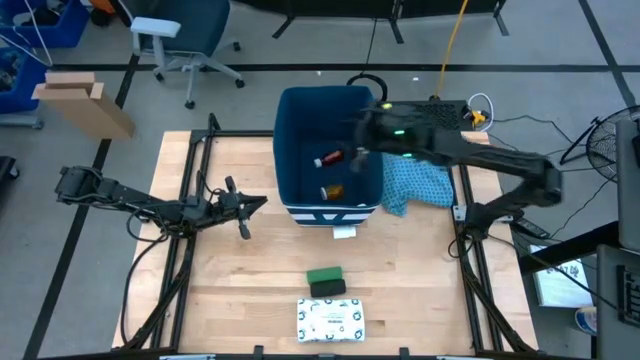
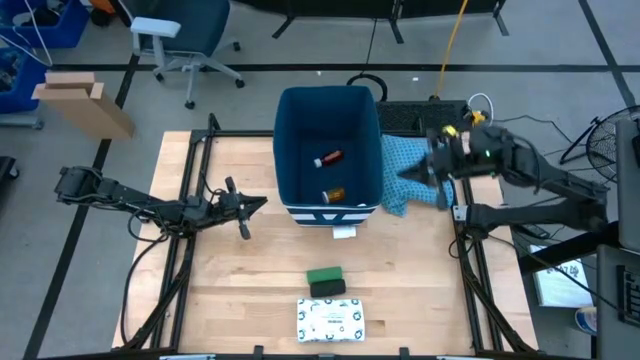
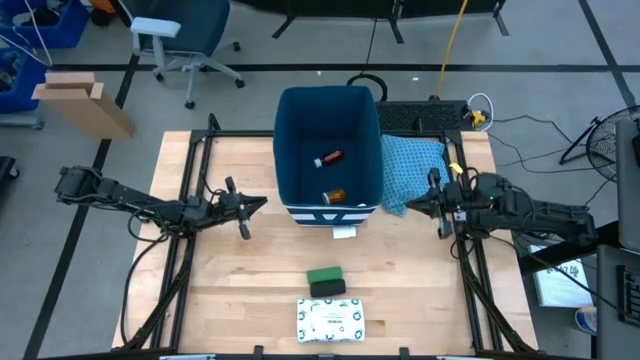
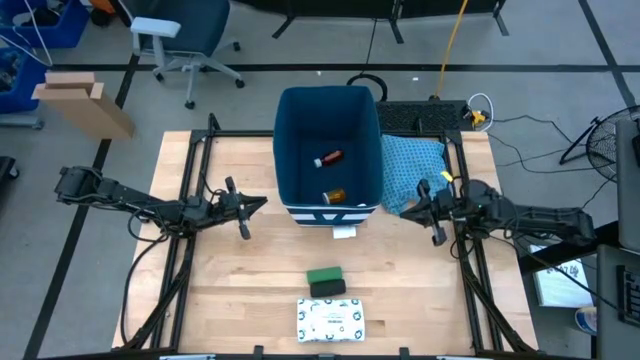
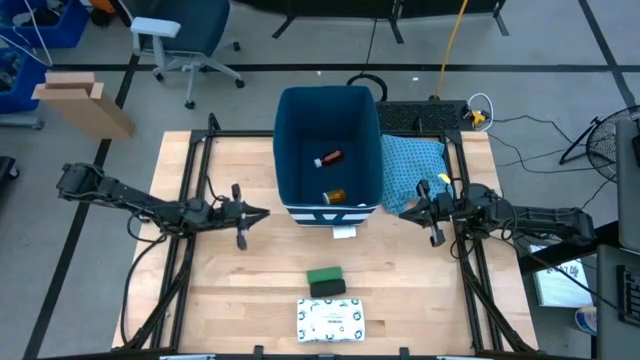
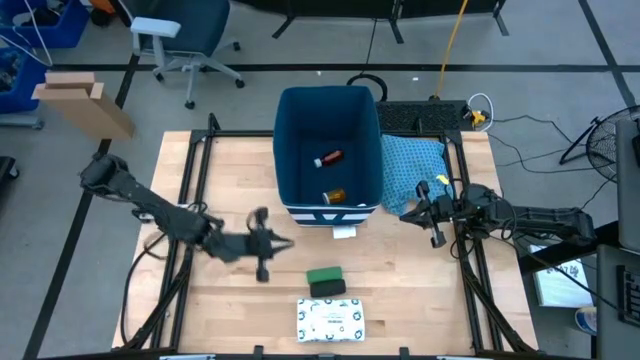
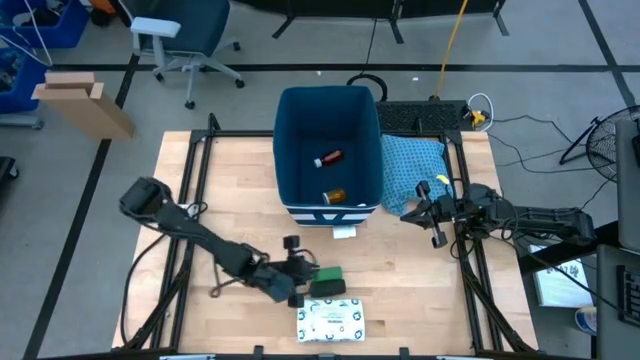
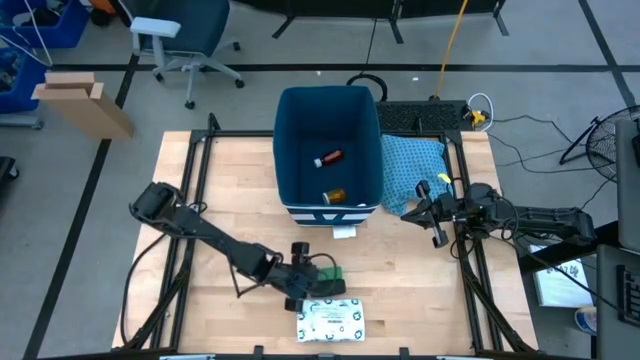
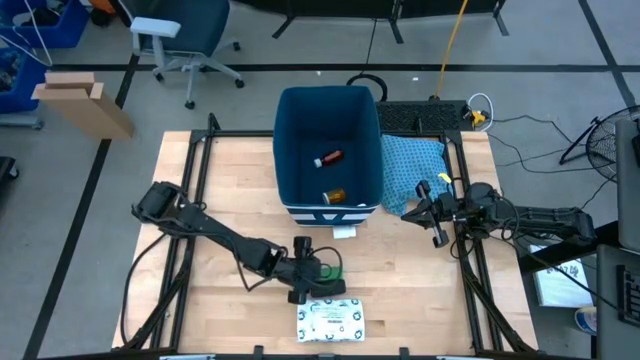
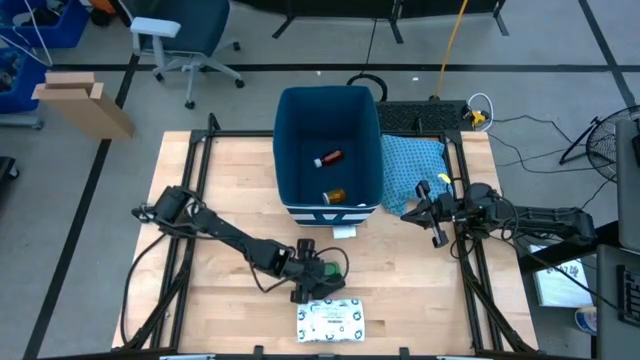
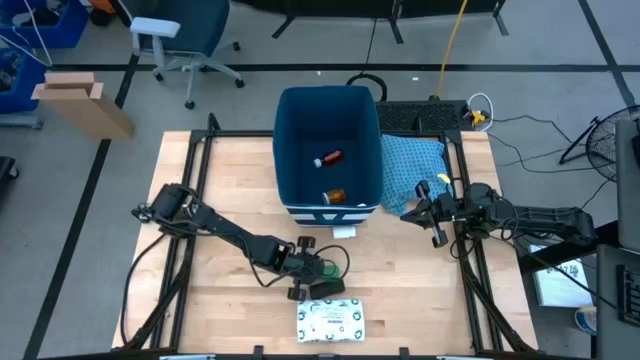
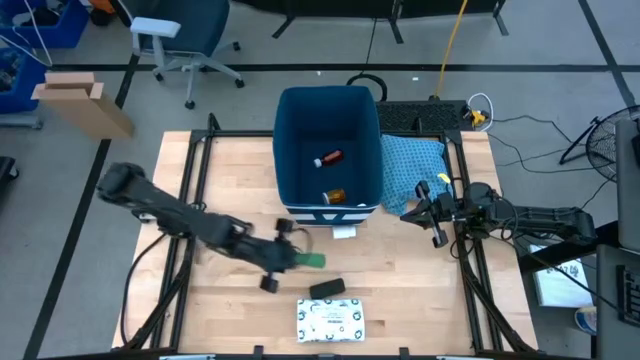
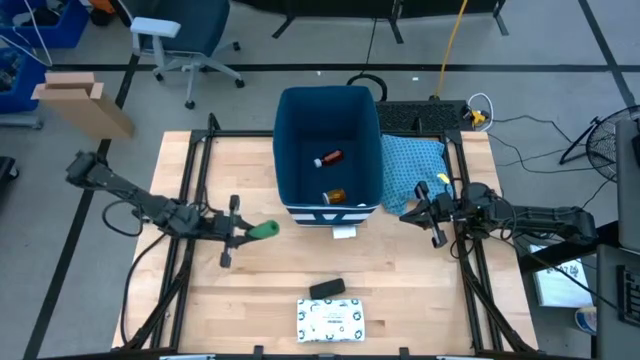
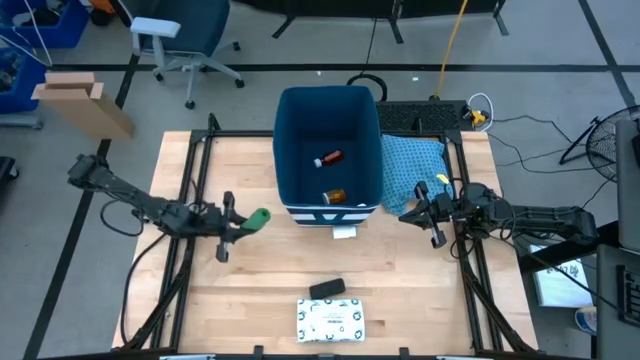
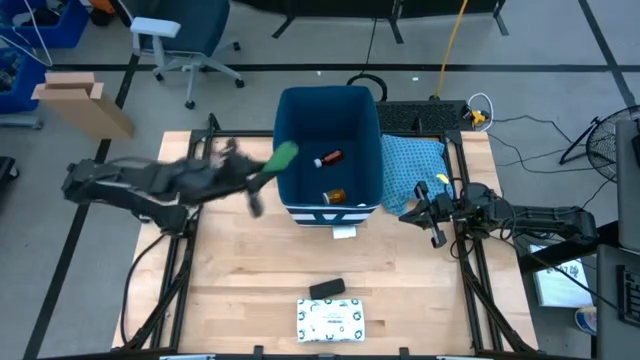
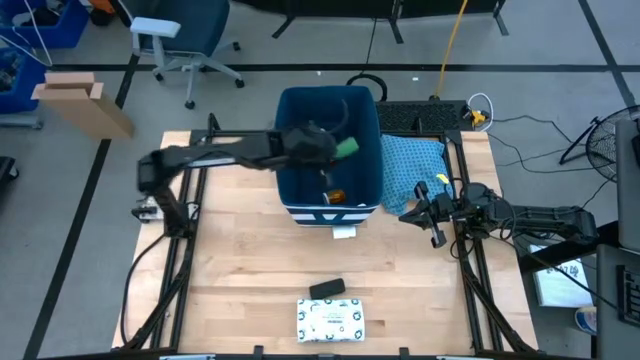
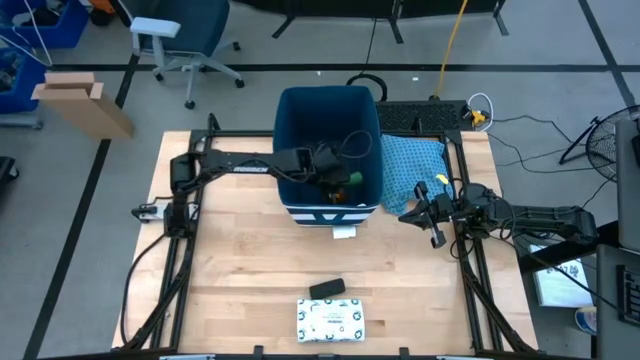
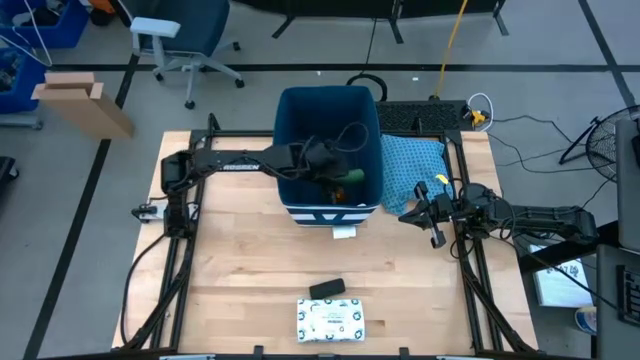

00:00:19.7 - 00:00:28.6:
Task: Pick & place medical supplies in basket/bin
Put the green bandage into the blue bin

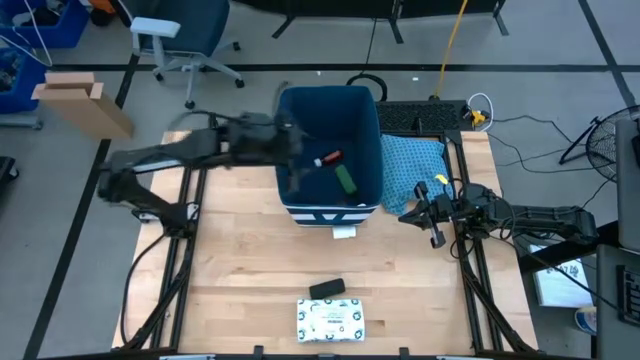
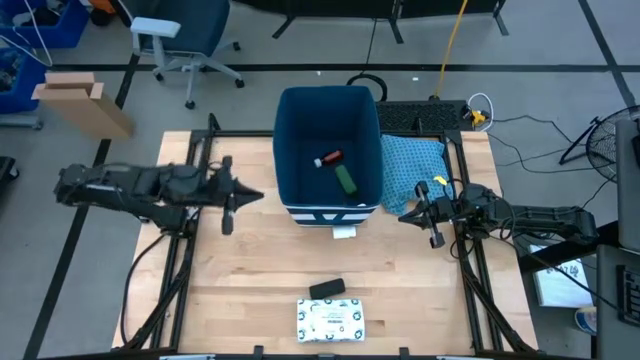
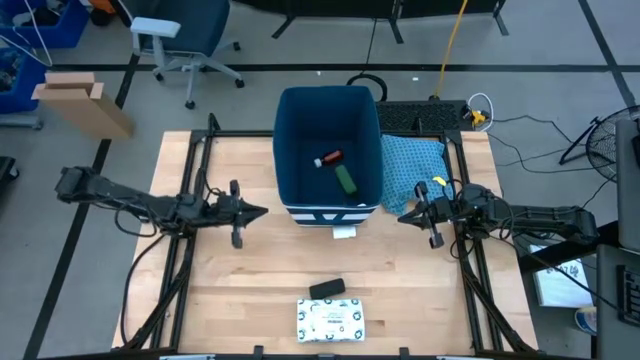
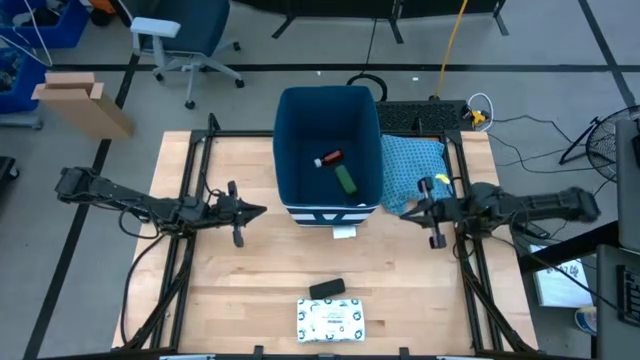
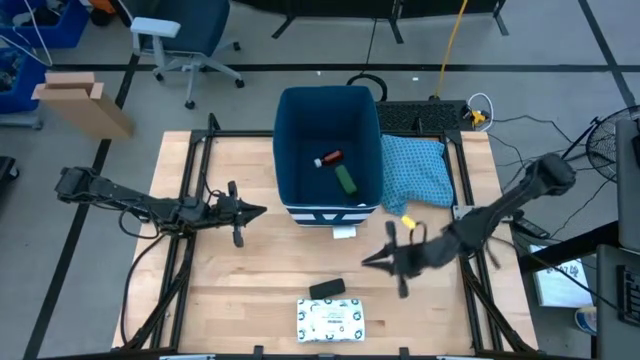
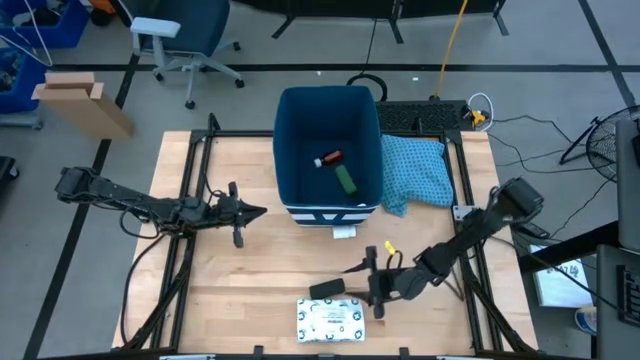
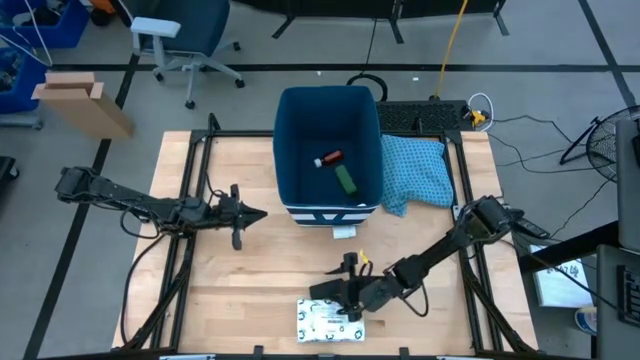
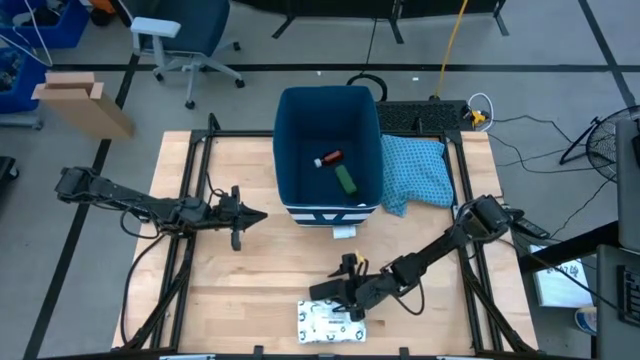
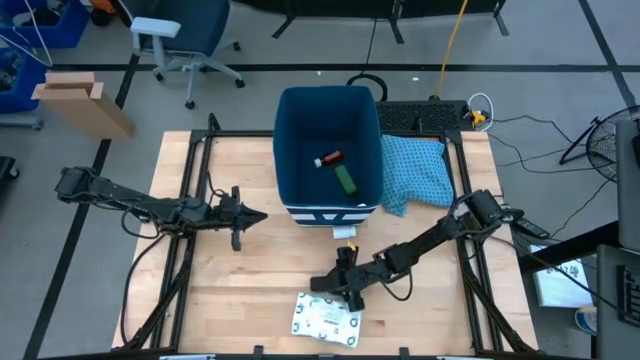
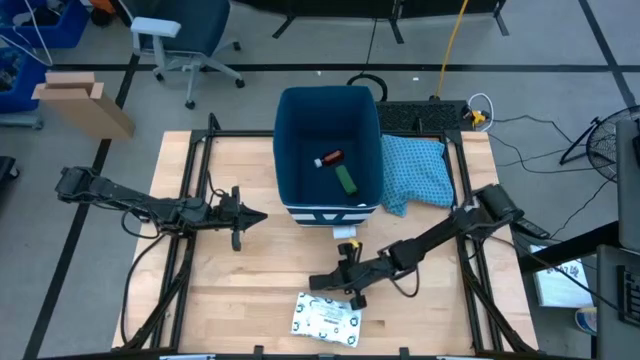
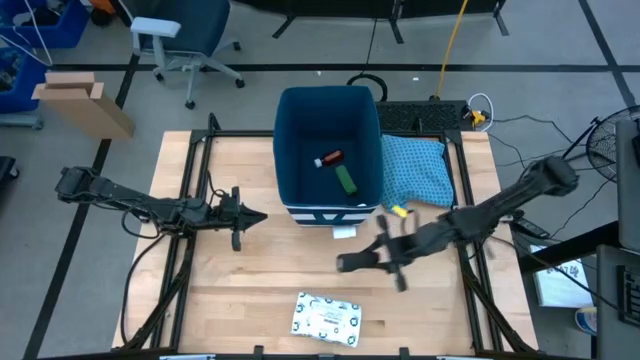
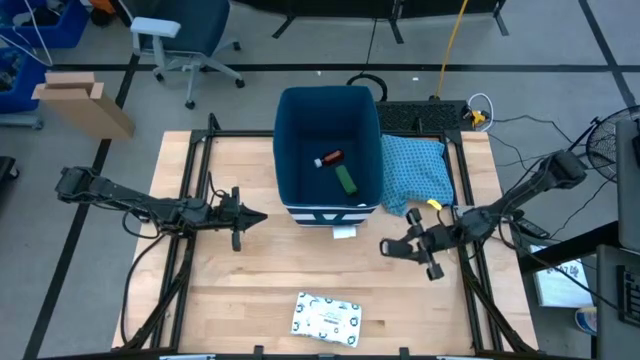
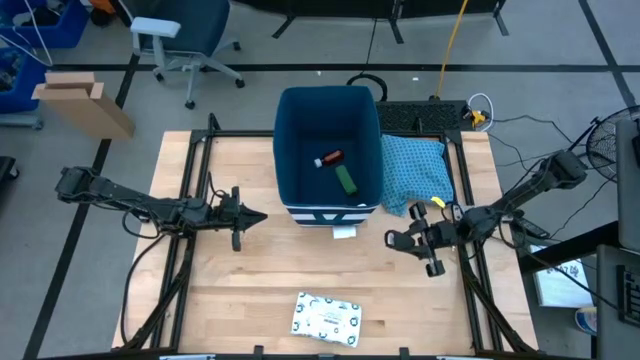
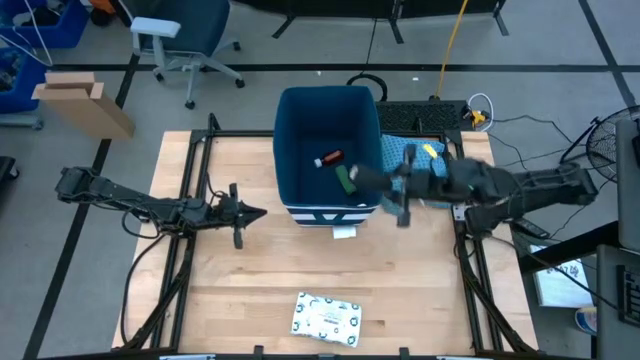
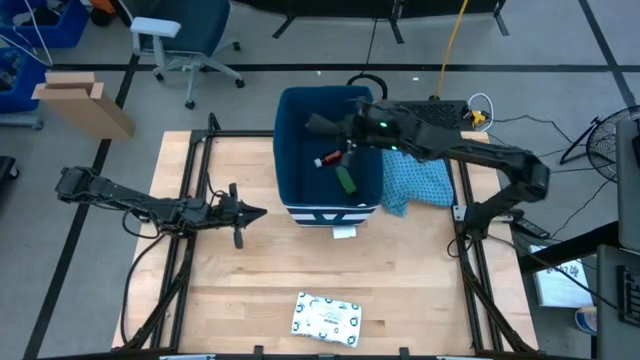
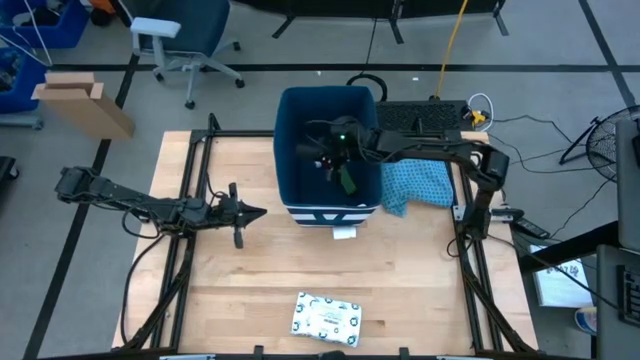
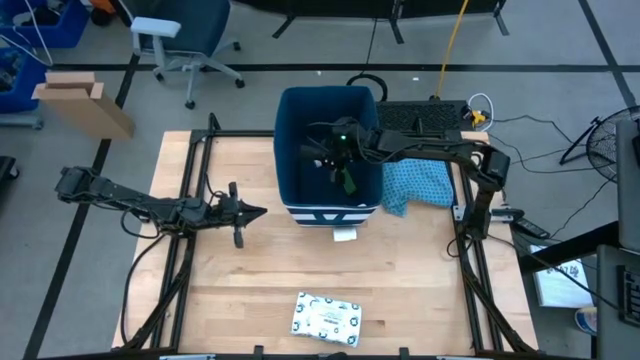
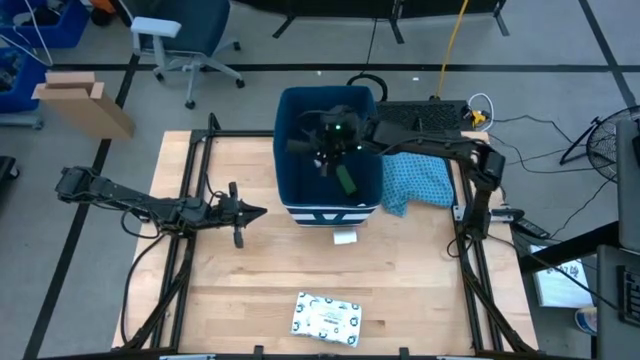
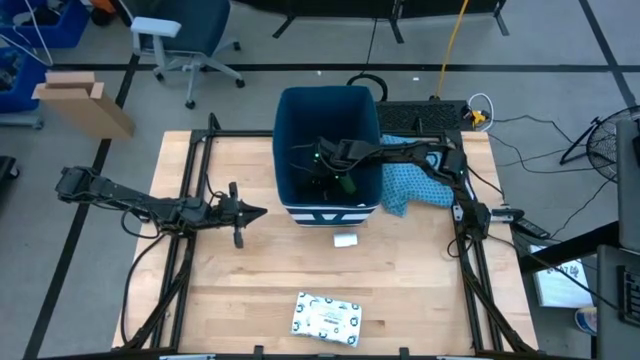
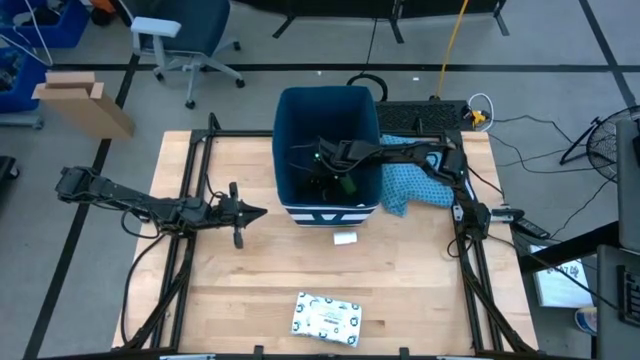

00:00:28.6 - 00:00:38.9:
Put the black bandage into the blue bin

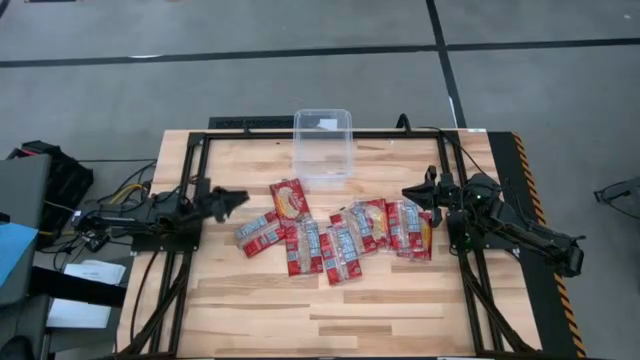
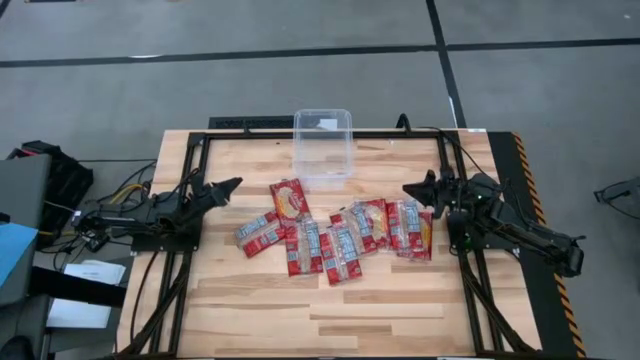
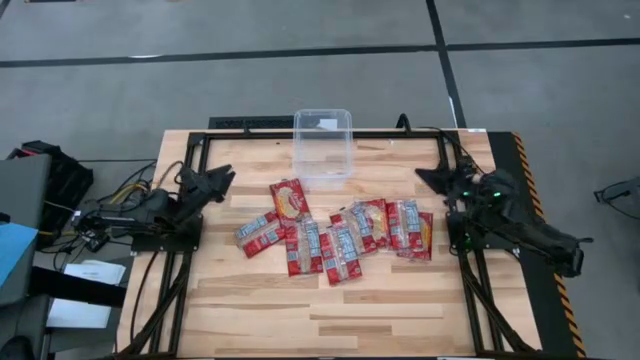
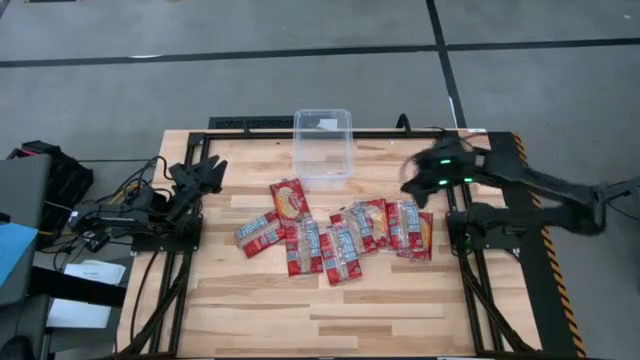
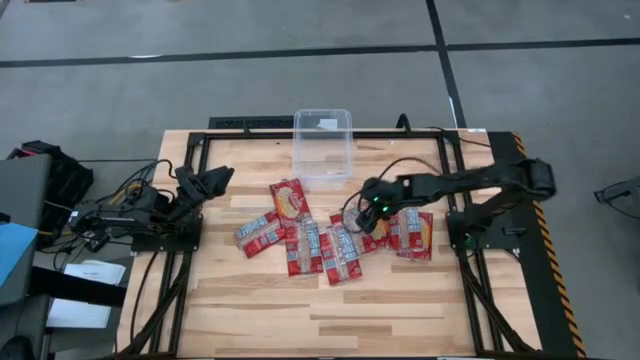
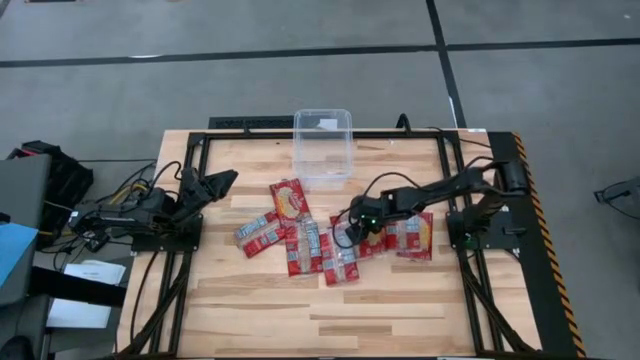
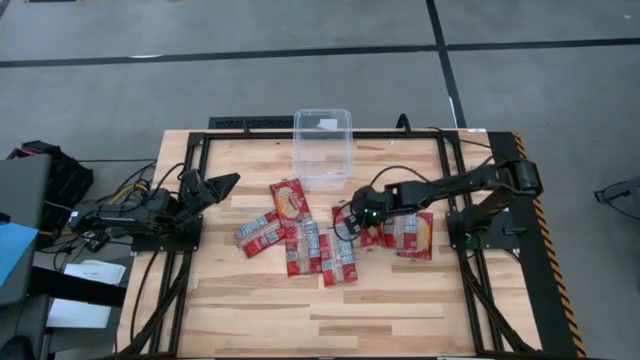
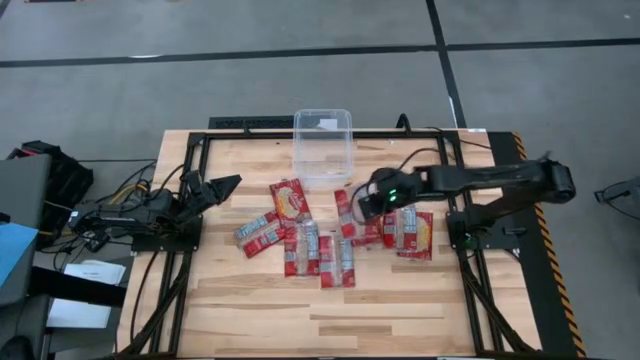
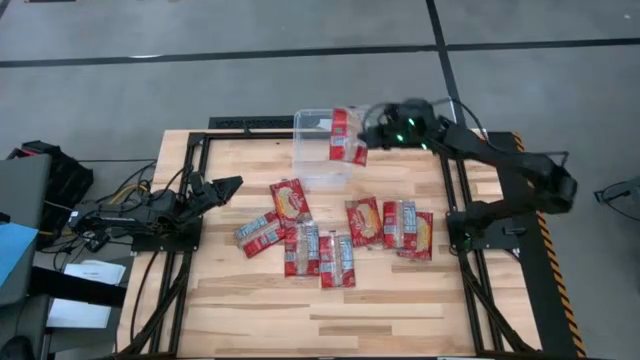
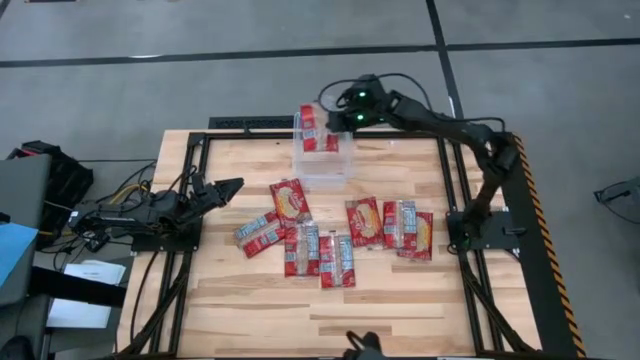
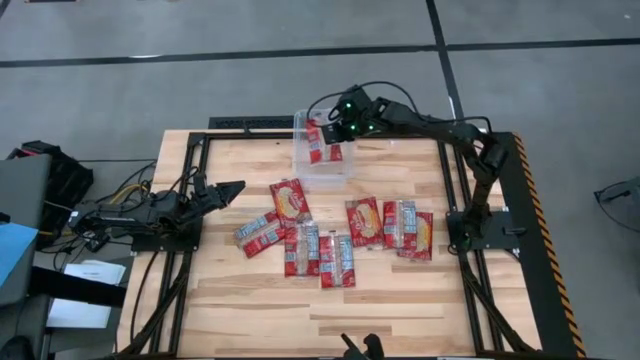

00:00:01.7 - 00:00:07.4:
Task: Sort popcorn bags into baskets
Put the red popcorn bag into the transparent bin
